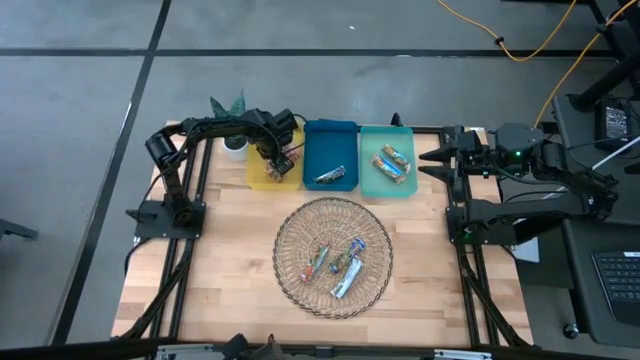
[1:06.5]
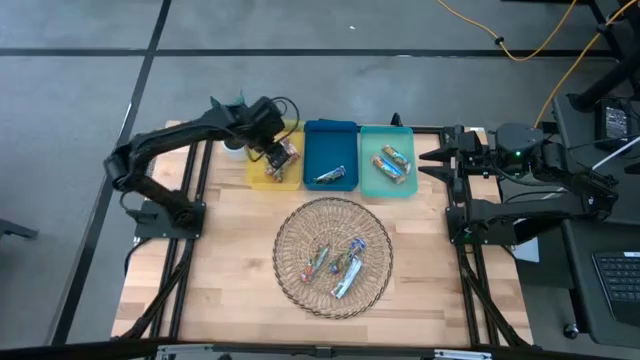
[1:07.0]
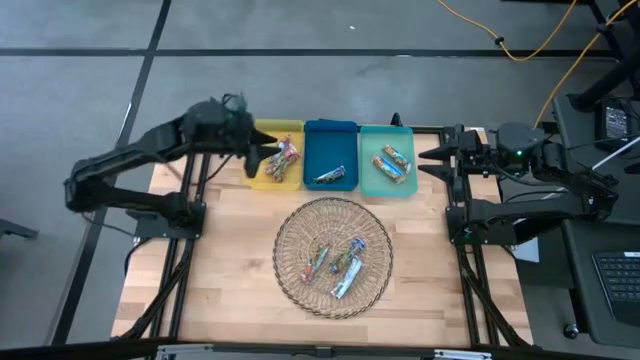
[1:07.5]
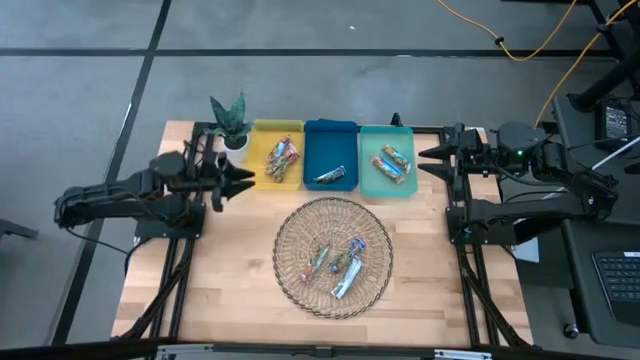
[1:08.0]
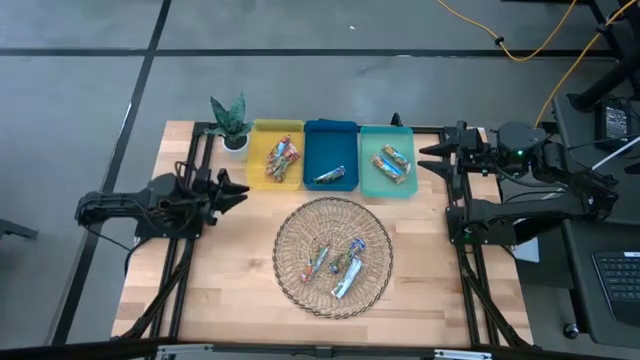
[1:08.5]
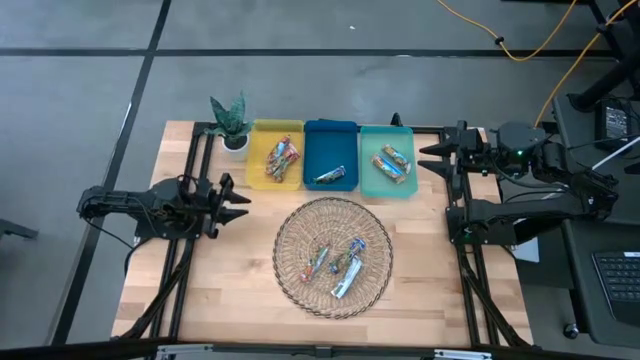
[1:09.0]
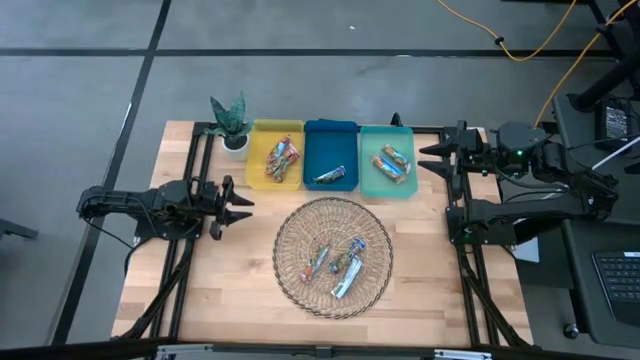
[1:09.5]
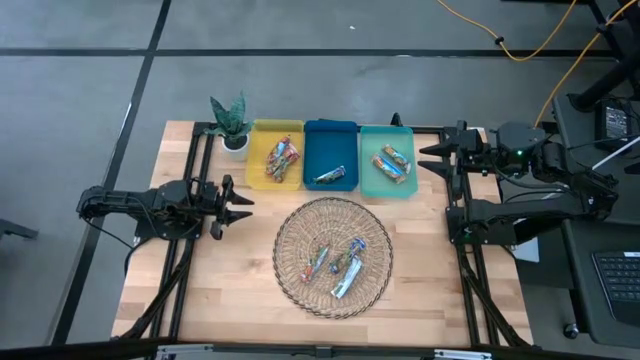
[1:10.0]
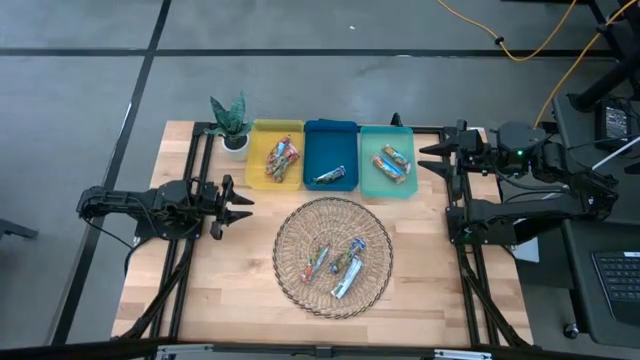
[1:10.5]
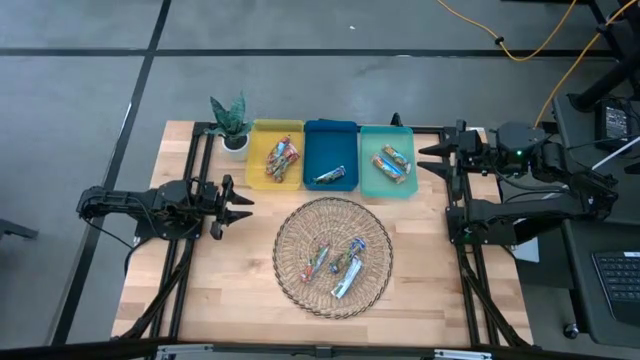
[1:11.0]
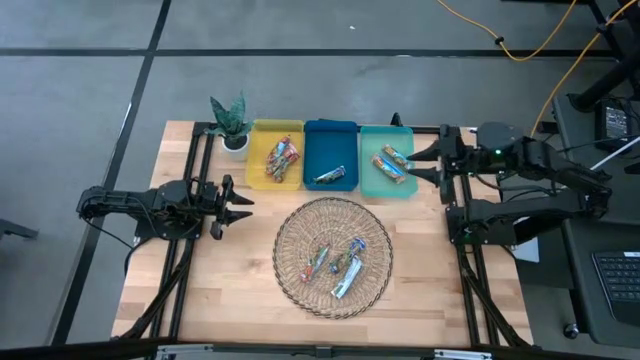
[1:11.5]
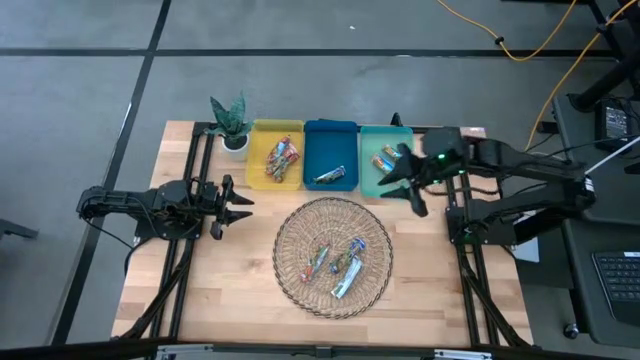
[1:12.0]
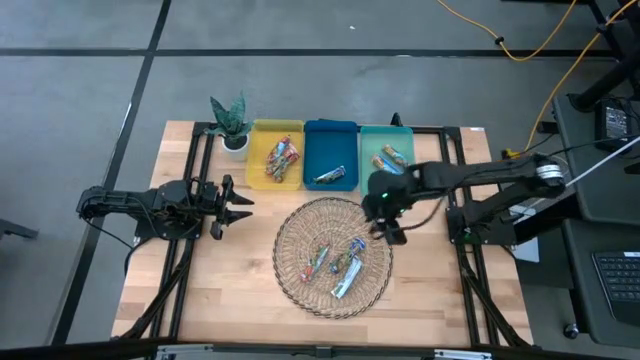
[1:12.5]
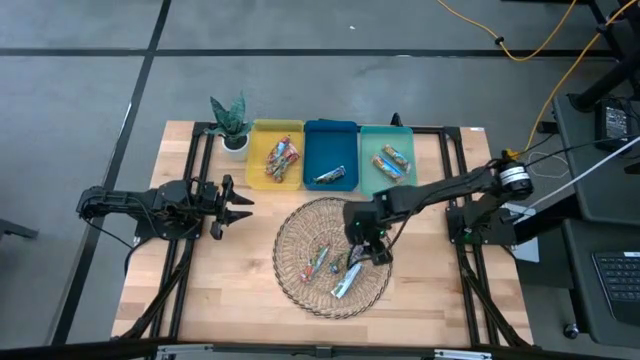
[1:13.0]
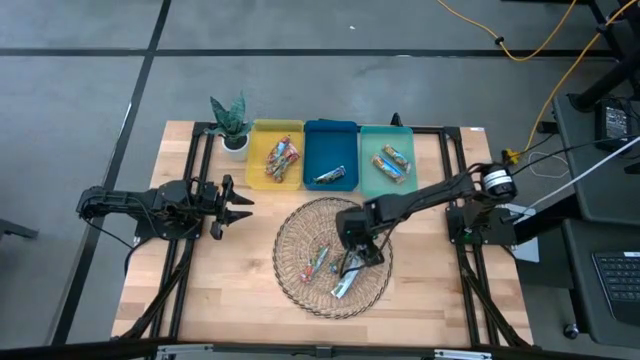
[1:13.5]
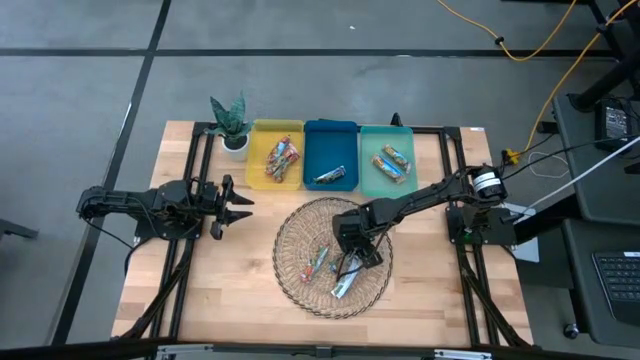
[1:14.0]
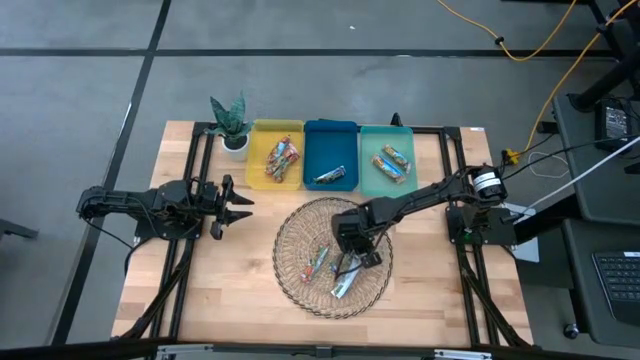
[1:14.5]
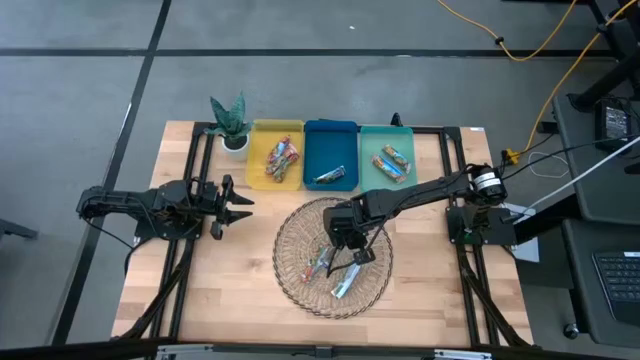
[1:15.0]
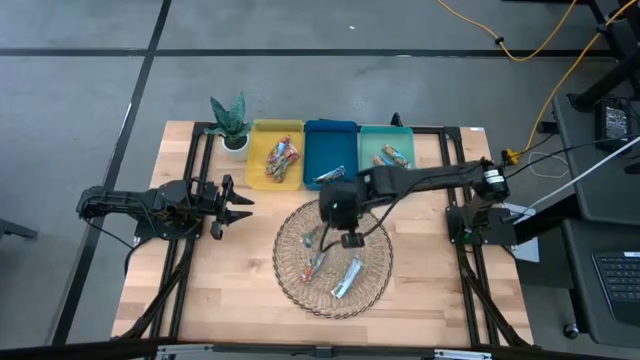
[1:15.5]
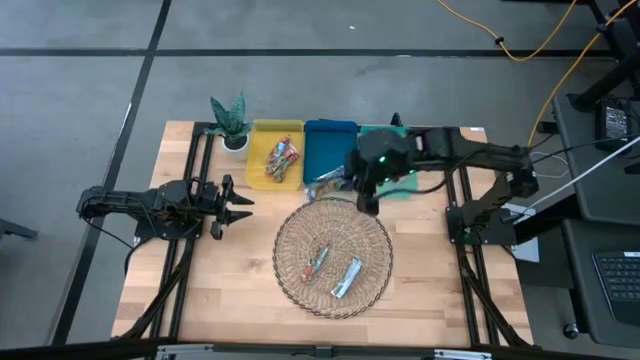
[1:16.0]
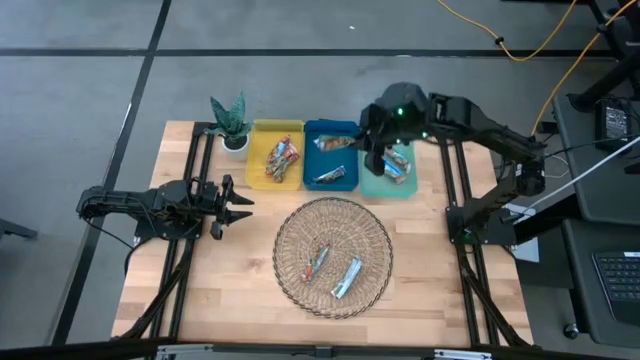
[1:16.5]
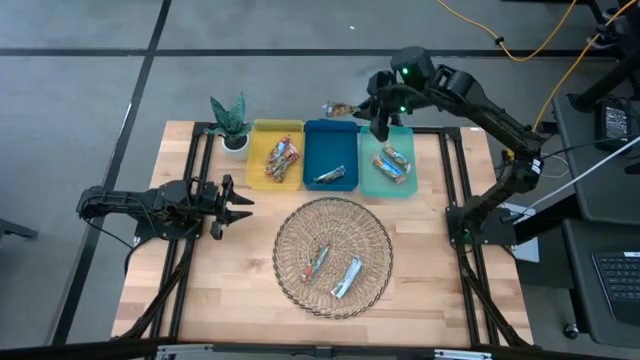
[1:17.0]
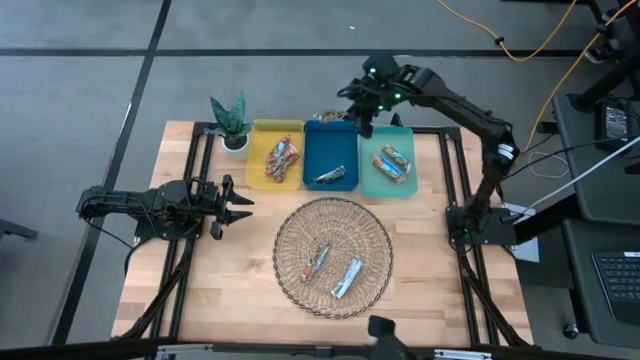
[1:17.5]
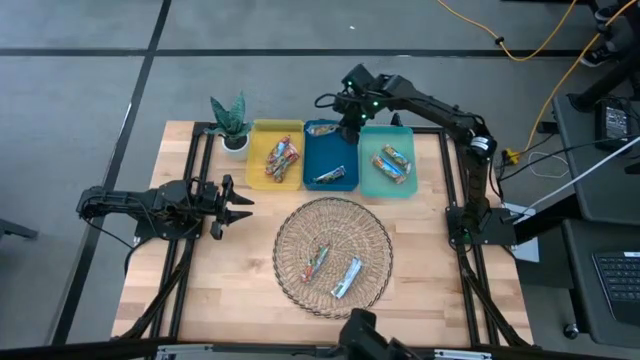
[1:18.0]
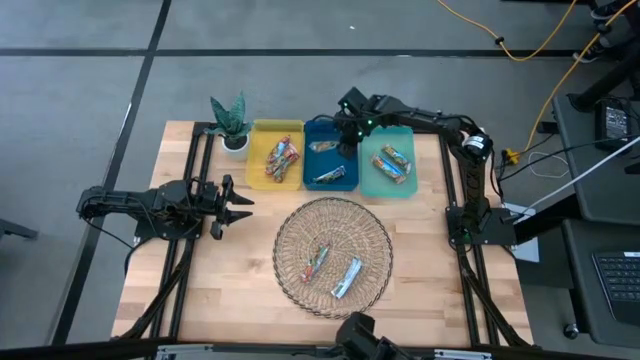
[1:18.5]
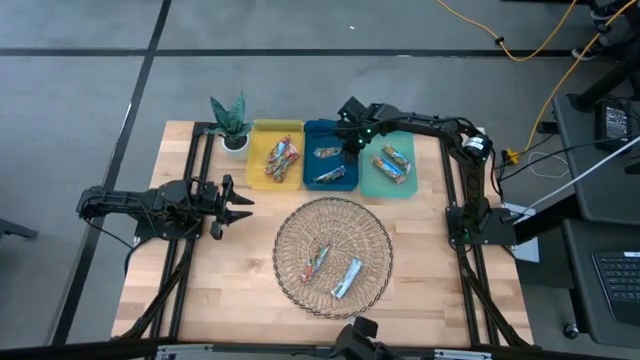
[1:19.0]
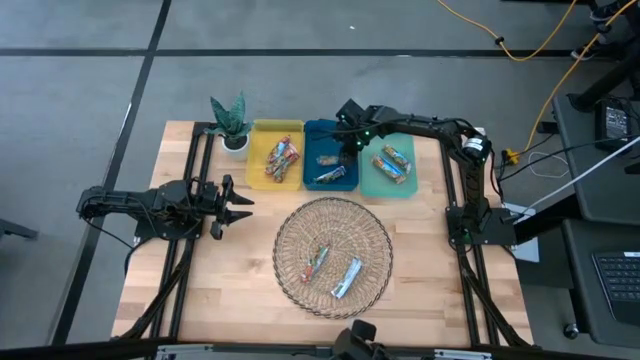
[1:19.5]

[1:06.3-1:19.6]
Task: Pick and place Granola Bars by type
Put the blue granola bar into the blue bin

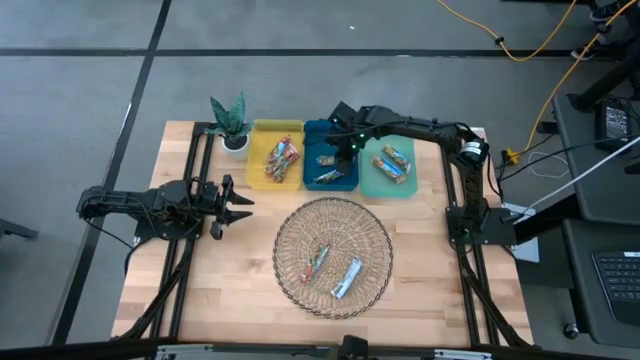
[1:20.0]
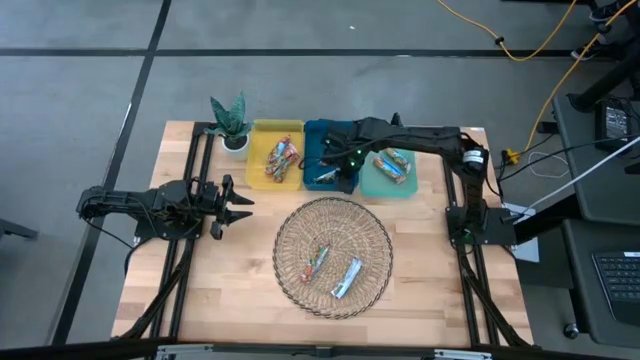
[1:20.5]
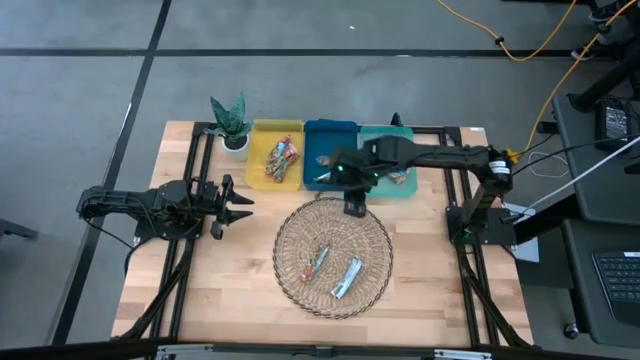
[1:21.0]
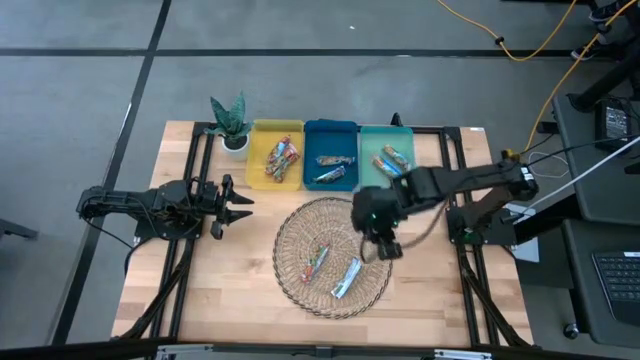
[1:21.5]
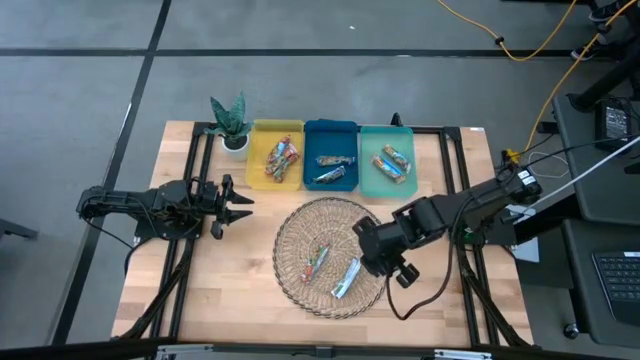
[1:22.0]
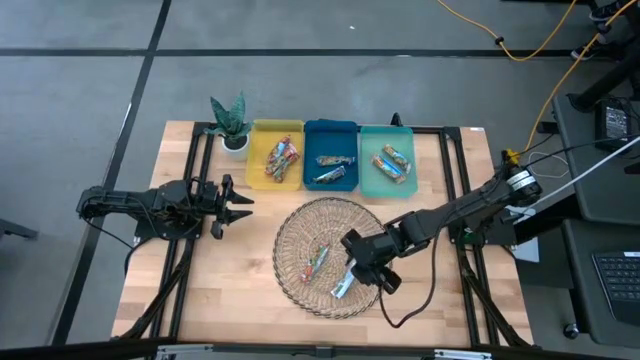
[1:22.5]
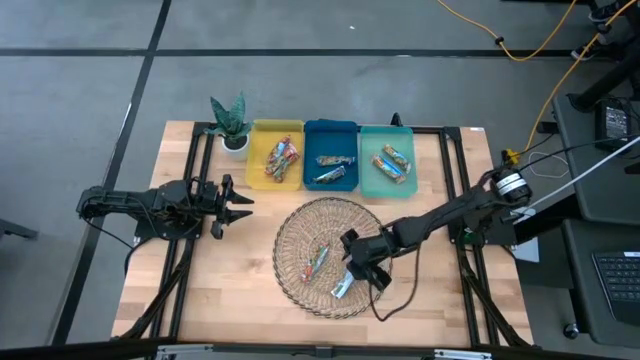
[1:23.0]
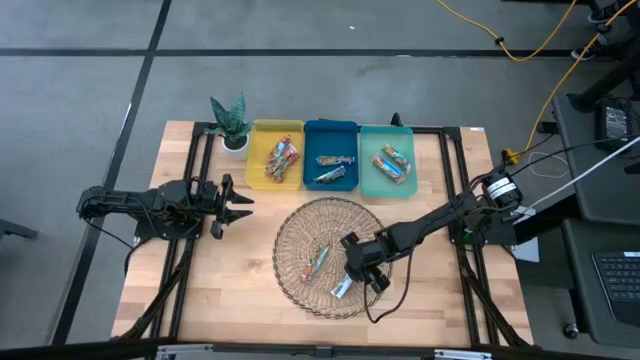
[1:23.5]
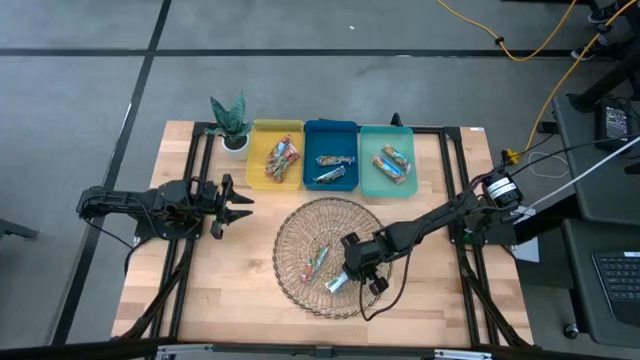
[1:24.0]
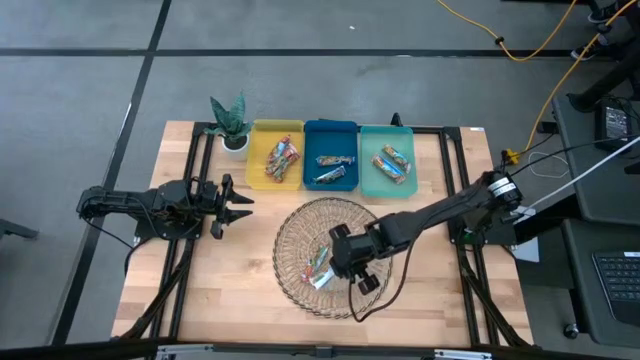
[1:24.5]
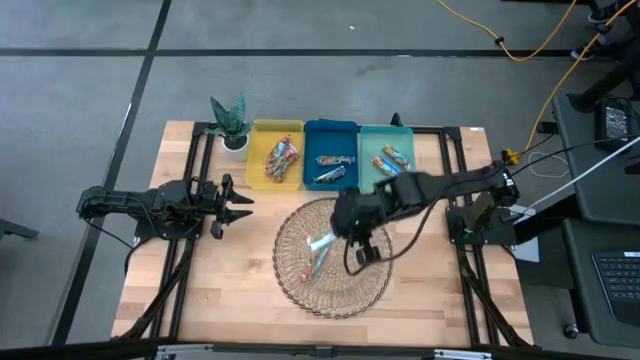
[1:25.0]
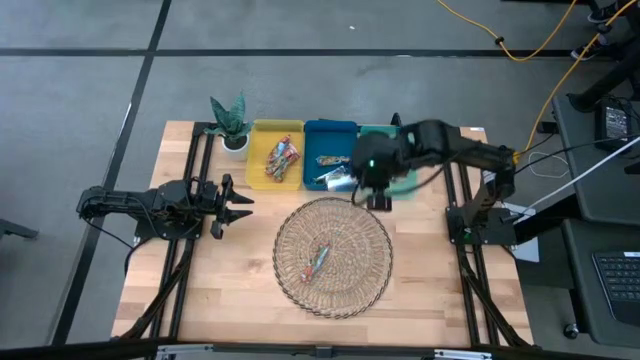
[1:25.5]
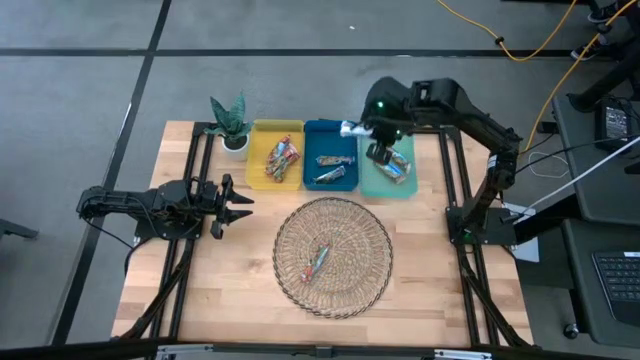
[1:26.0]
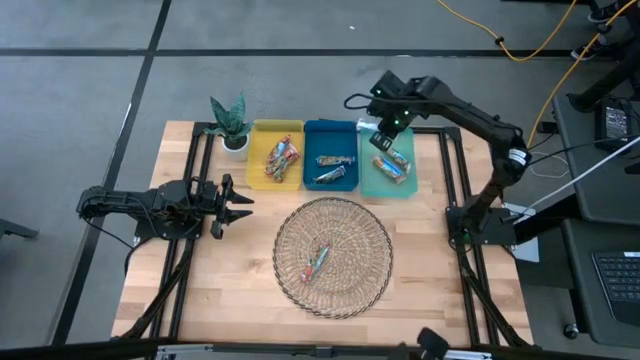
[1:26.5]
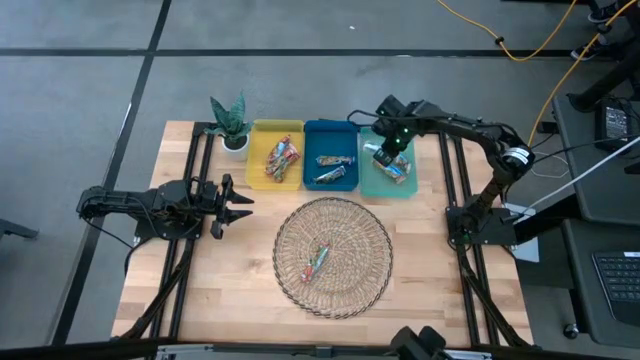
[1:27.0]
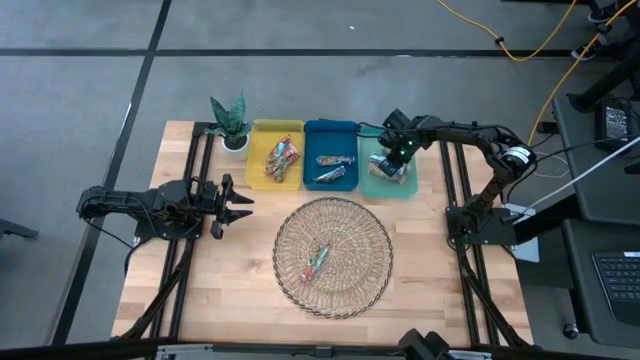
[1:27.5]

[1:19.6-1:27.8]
Put the orange granola bar into the green bin
